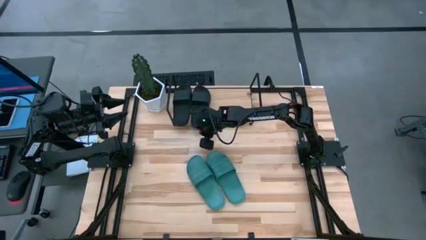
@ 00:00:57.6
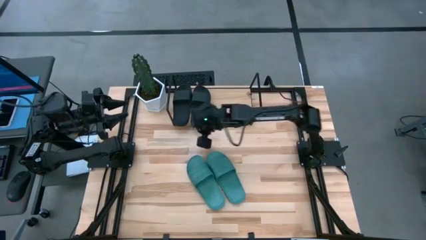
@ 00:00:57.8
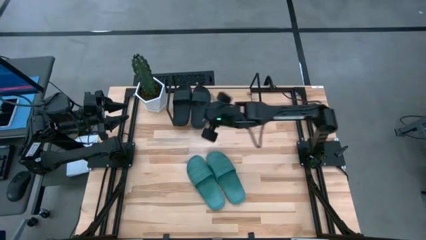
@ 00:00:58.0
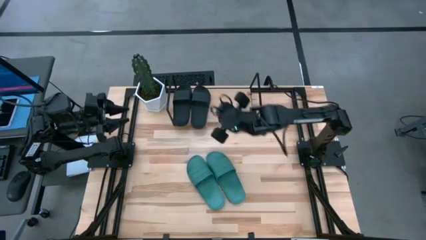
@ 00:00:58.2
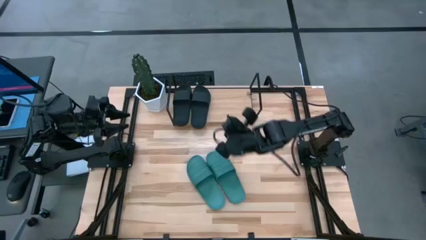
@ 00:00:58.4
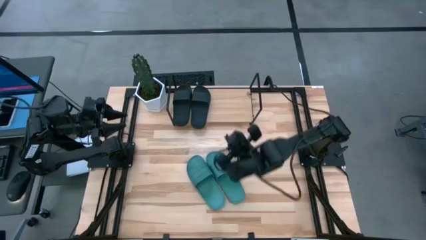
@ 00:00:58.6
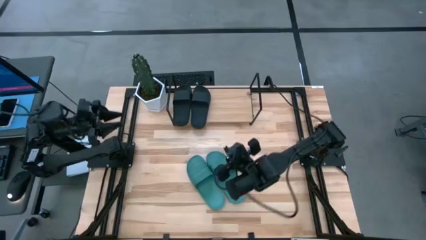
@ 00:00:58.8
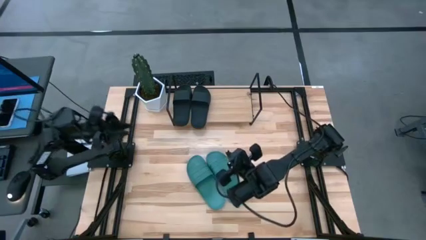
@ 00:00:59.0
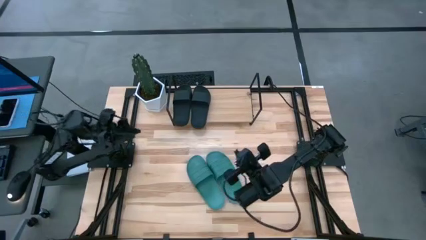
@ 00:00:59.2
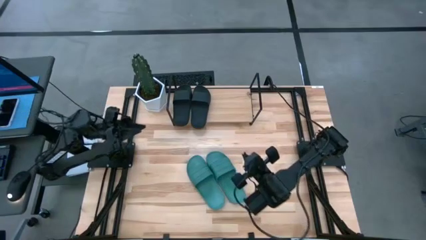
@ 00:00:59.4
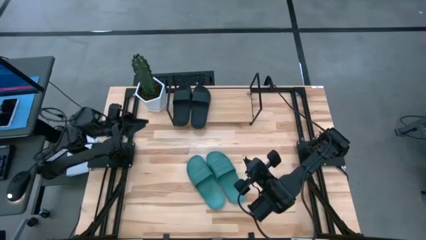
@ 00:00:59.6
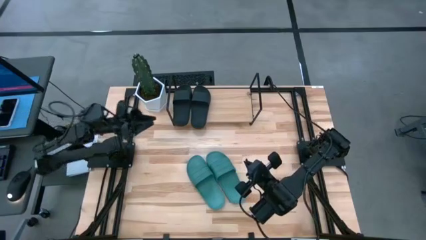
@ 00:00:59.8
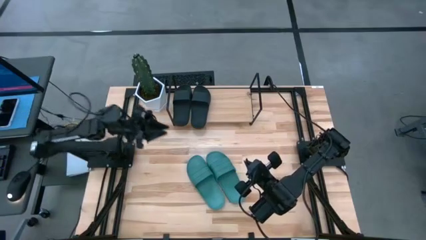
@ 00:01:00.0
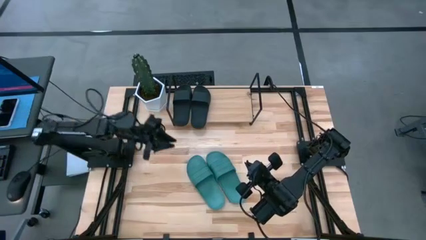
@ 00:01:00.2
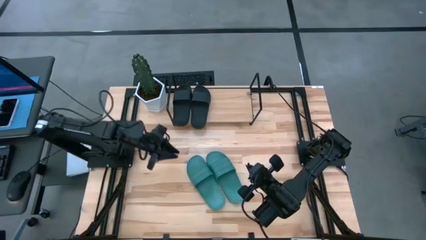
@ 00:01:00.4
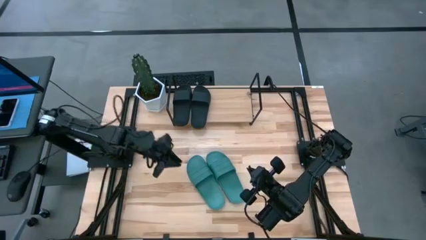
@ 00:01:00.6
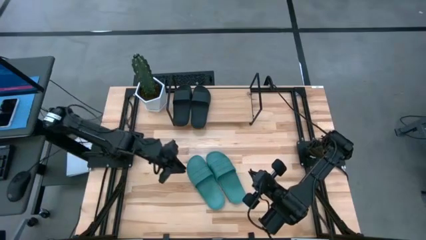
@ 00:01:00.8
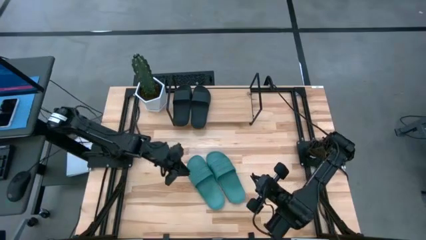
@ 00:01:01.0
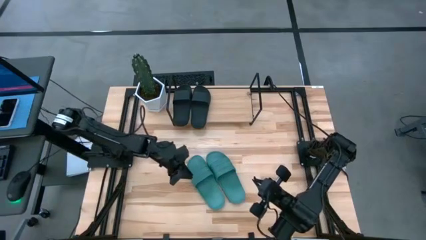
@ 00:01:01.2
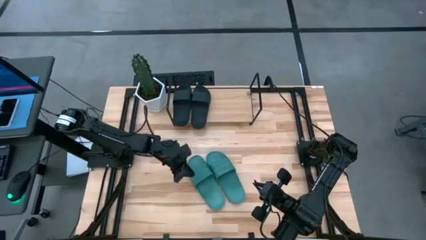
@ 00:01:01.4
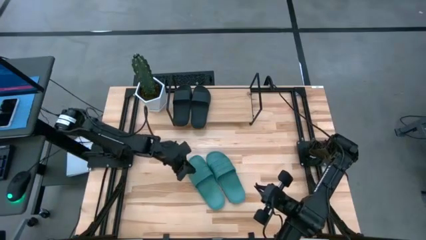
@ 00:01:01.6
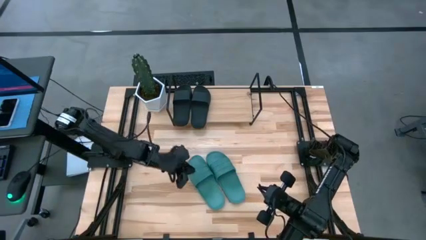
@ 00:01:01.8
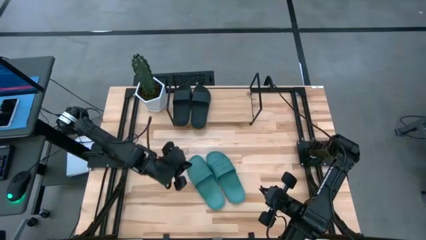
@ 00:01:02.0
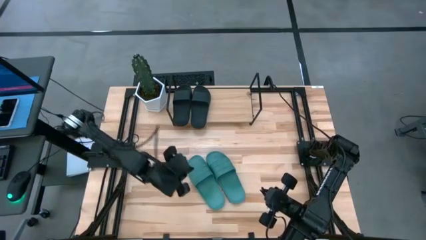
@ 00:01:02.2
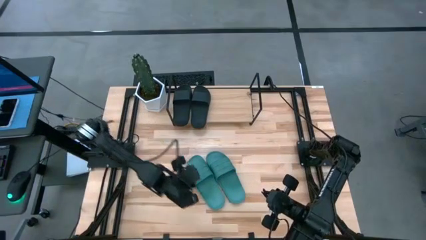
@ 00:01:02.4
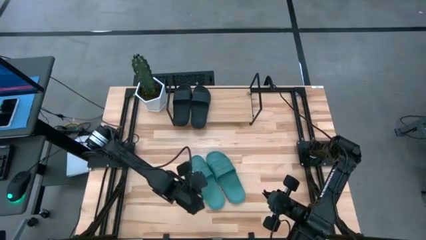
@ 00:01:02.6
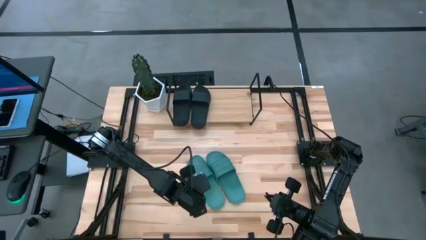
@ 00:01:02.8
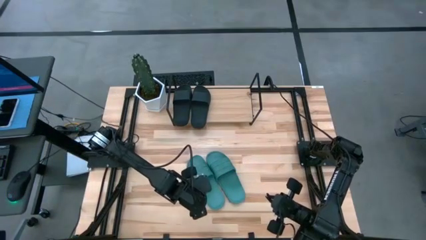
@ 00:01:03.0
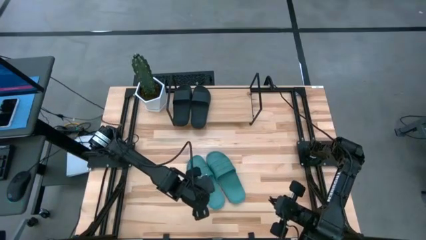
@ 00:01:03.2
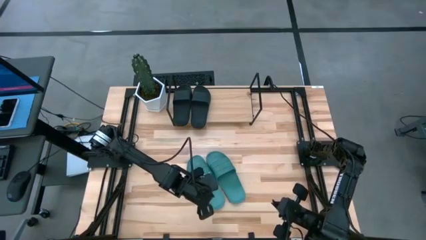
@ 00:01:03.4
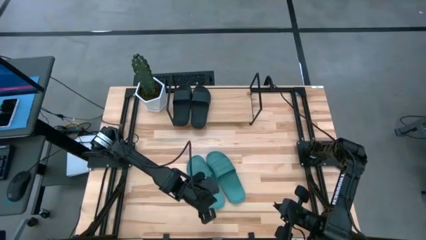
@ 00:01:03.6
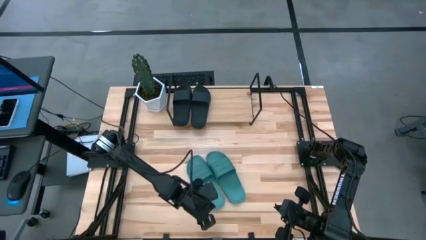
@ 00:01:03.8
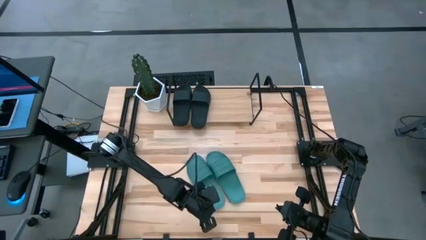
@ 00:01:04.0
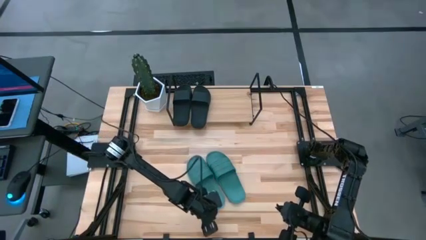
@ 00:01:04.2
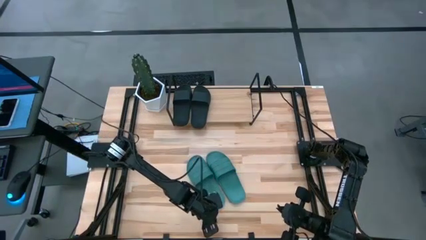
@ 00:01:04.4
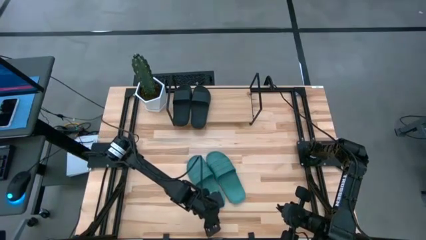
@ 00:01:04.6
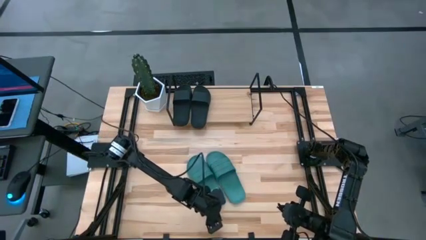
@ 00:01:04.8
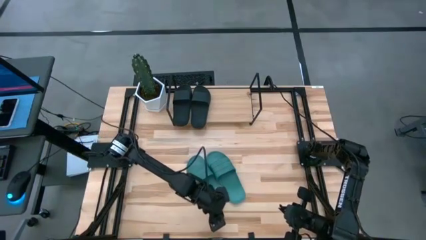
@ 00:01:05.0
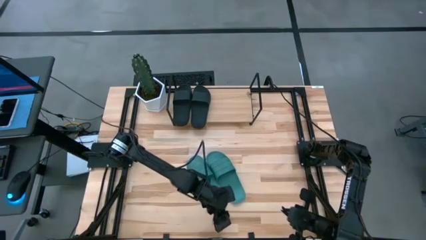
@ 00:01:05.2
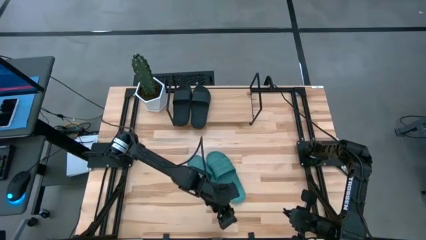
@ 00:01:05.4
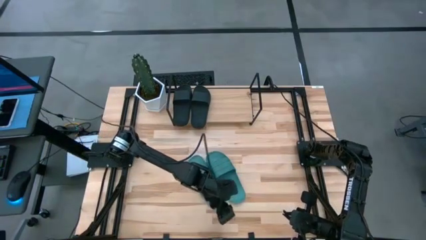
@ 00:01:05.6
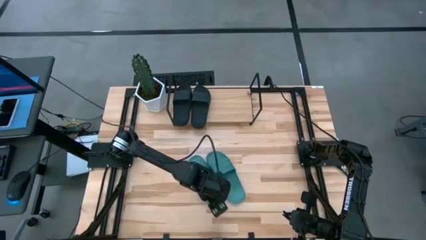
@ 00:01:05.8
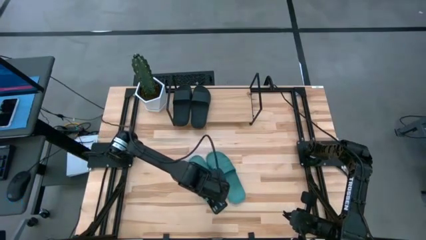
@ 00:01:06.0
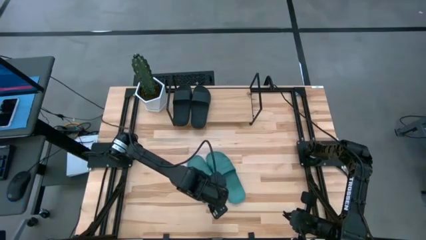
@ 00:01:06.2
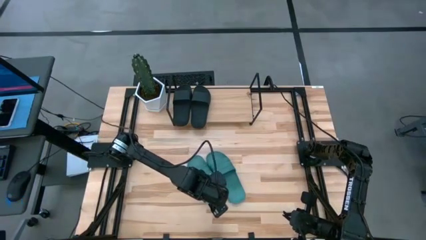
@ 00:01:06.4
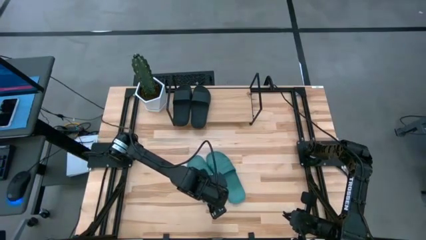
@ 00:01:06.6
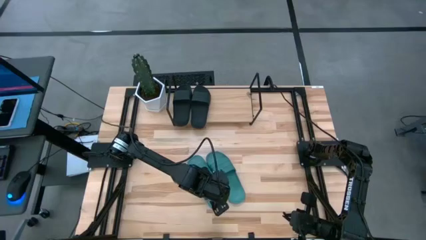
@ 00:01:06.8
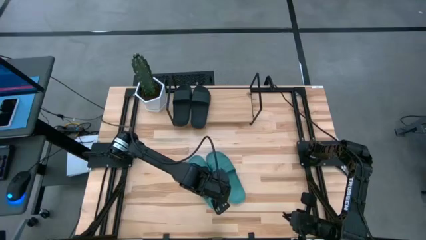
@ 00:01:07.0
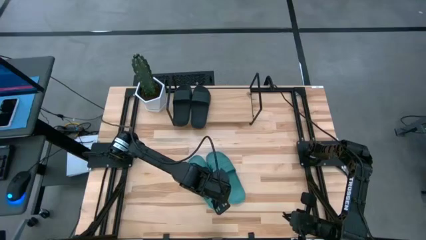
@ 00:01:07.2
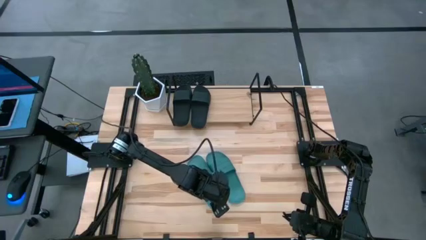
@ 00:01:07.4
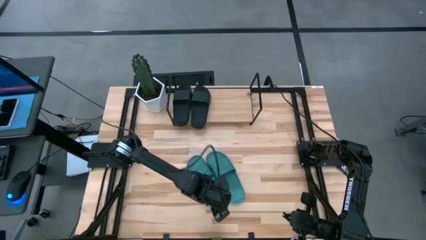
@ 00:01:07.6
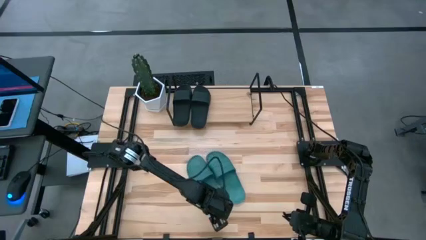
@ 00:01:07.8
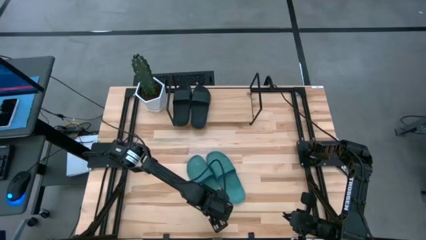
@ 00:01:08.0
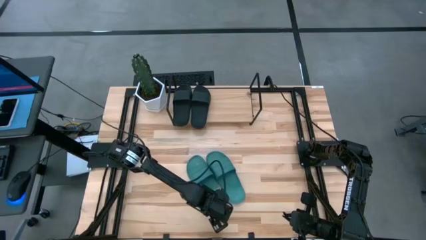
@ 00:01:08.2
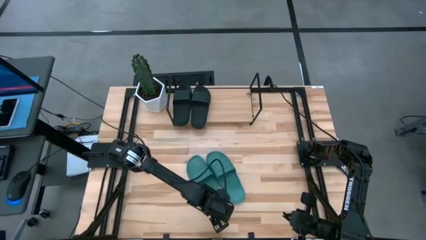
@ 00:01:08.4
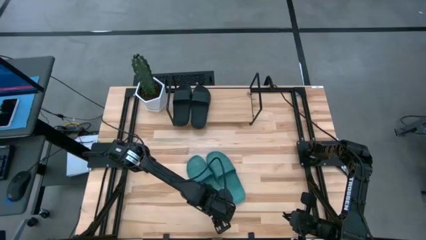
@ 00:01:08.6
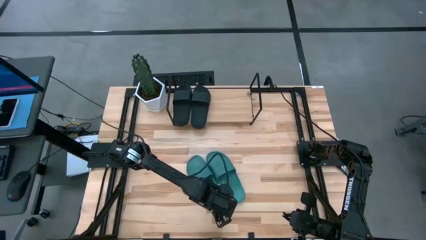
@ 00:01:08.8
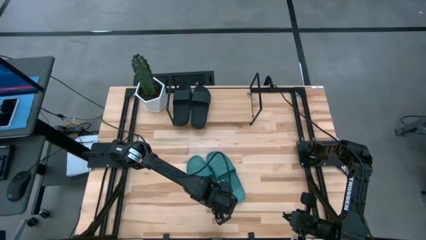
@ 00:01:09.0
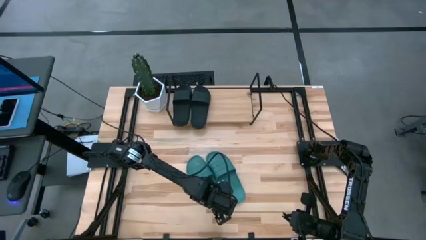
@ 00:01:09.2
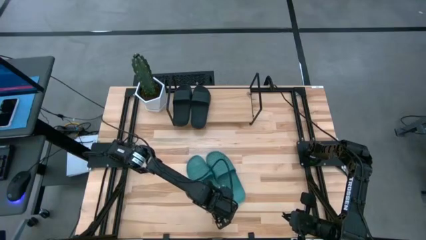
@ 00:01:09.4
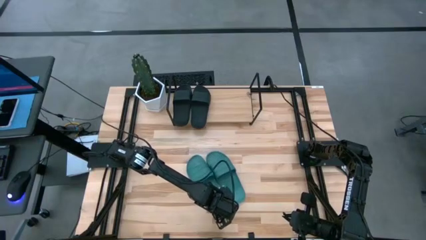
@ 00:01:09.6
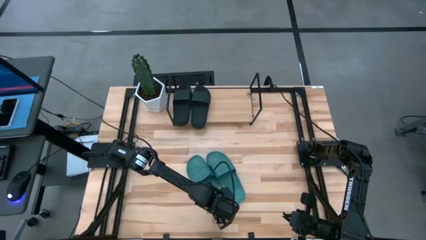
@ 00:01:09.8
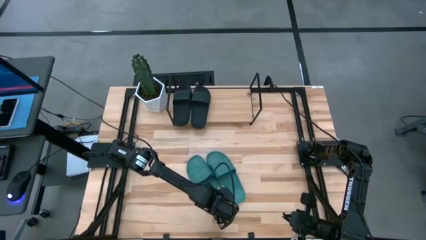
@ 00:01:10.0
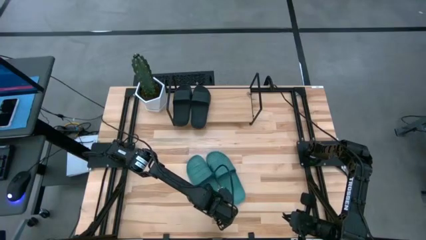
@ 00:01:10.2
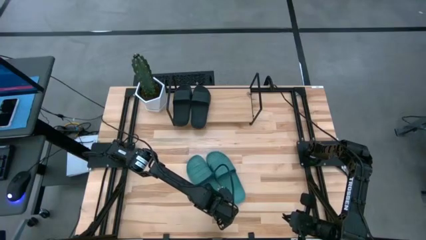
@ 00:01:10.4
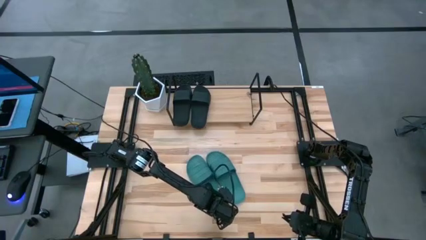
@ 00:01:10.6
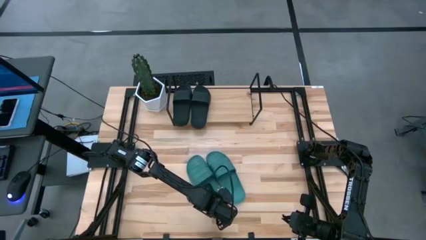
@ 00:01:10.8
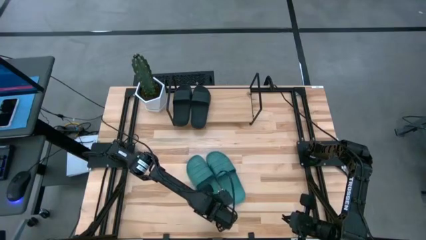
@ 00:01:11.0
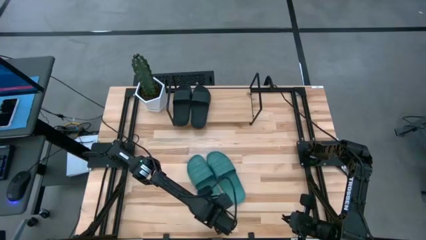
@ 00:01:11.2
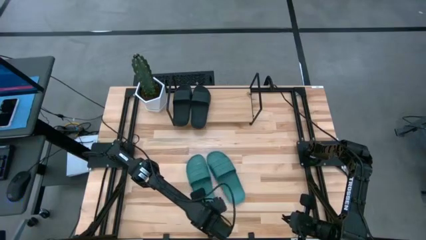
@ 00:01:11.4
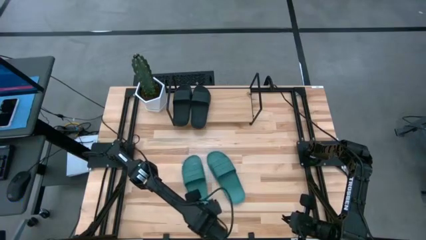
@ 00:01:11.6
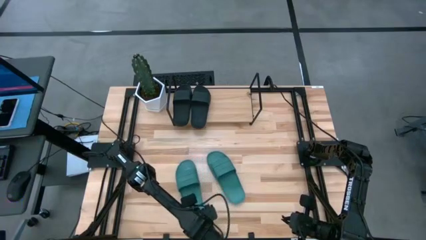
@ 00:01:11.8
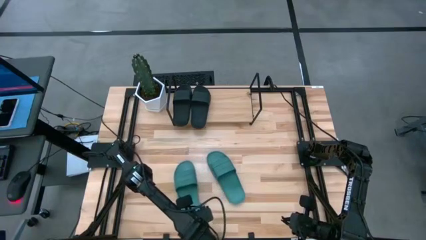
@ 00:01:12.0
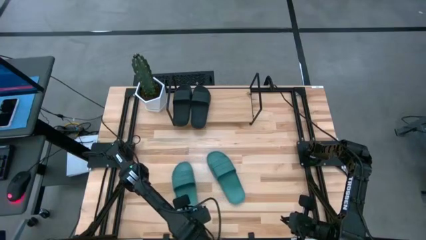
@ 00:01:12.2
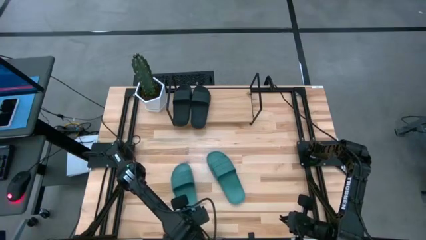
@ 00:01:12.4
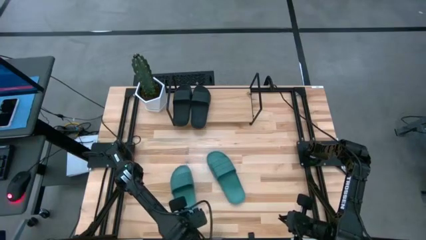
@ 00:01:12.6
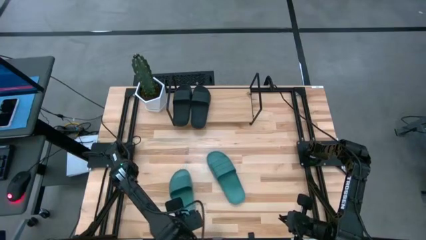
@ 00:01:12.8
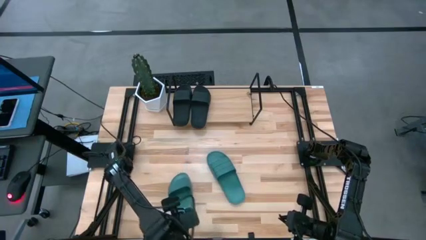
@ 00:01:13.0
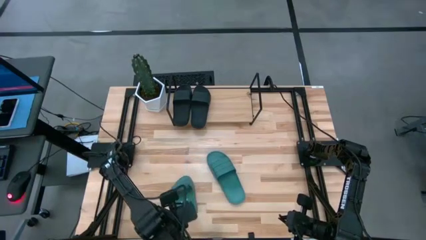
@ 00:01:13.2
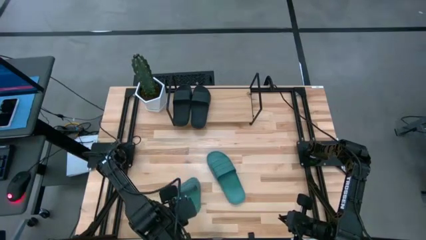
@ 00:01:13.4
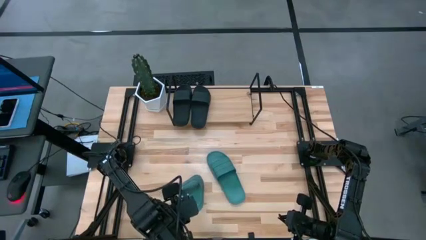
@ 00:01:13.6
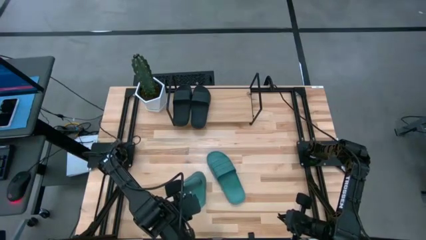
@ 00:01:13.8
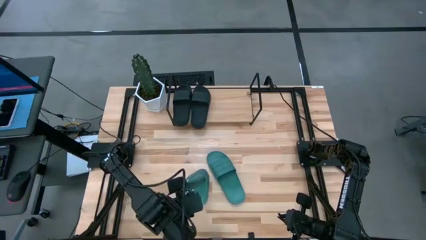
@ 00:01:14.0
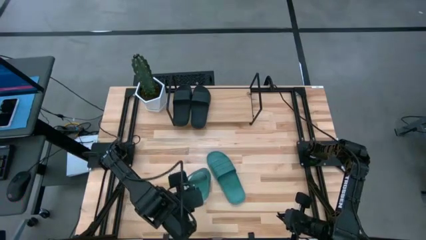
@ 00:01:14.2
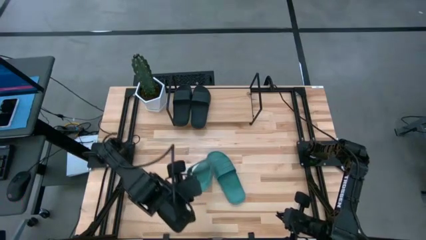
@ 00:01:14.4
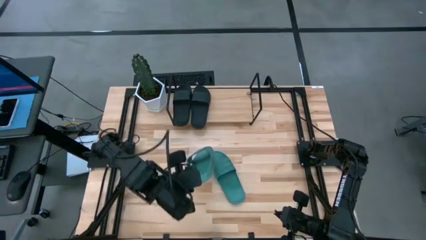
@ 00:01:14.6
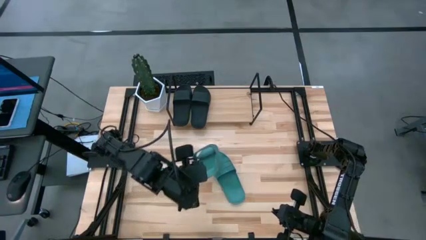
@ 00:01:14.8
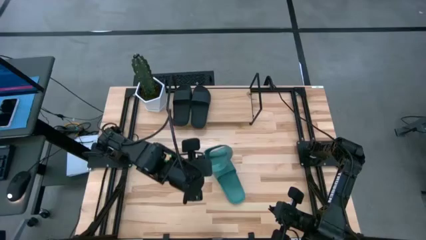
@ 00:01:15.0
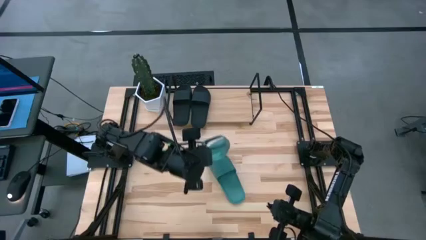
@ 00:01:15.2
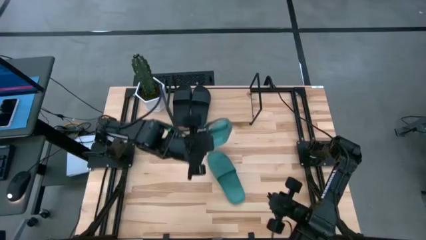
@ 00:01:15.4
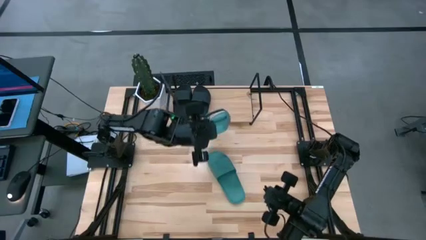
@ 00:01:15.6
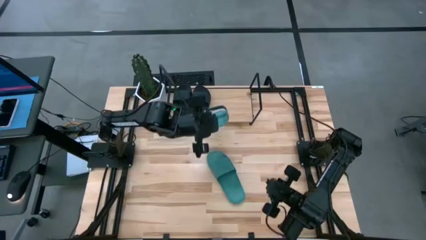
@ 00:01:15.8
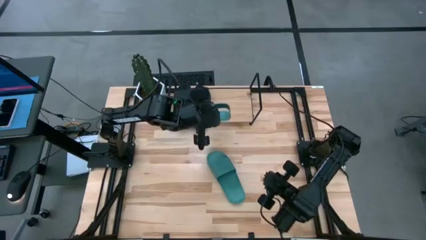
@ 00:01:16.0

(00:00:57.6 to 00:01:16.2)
Task: Pick and place slides into the shelf
Put the left green slides on the shelf
